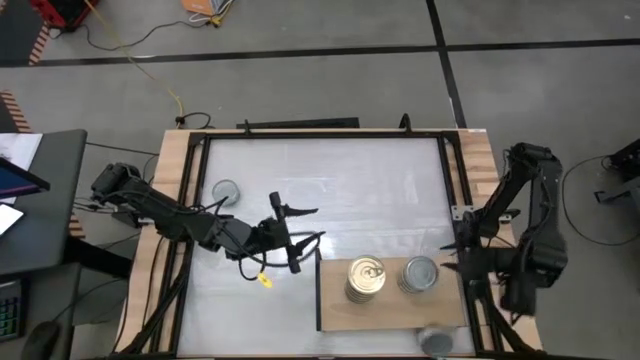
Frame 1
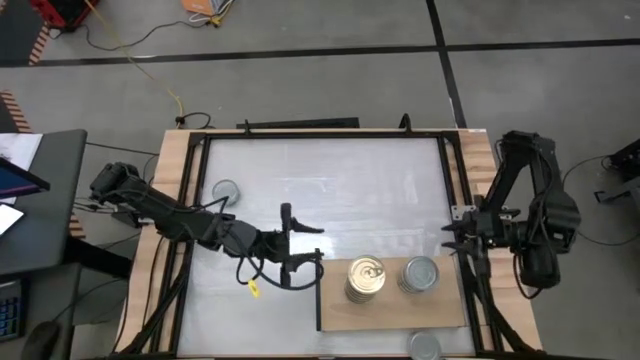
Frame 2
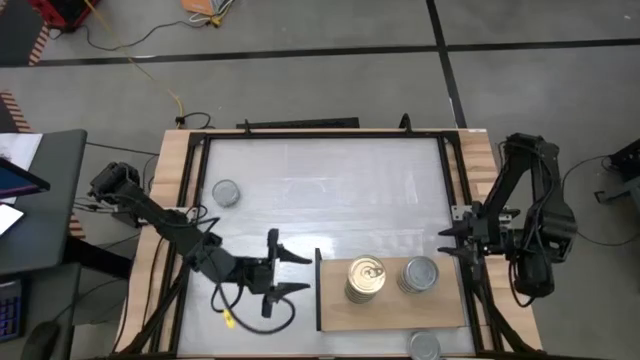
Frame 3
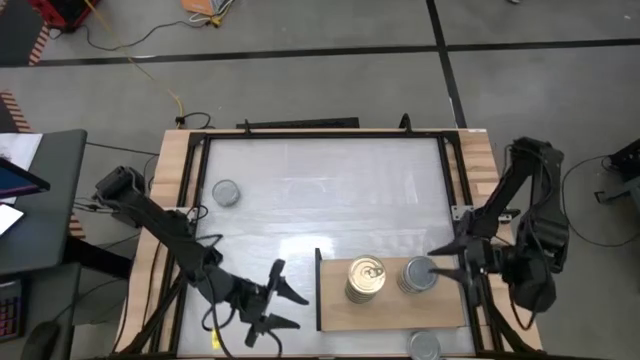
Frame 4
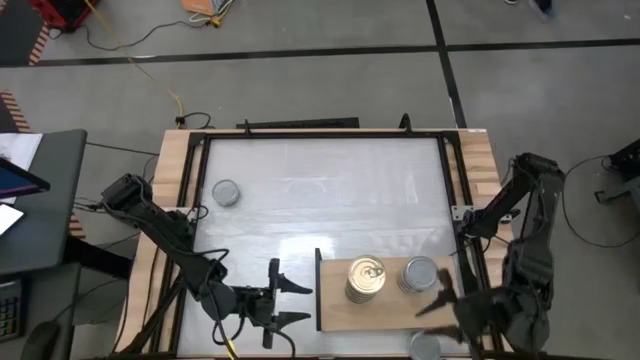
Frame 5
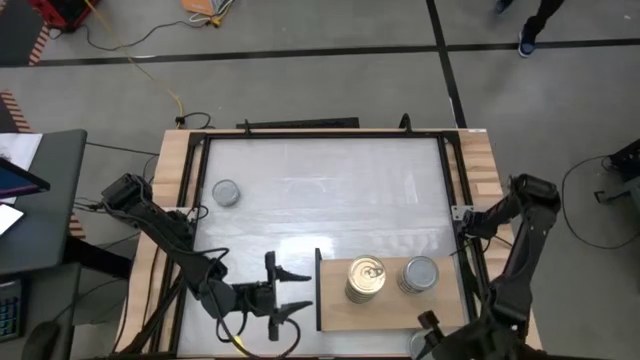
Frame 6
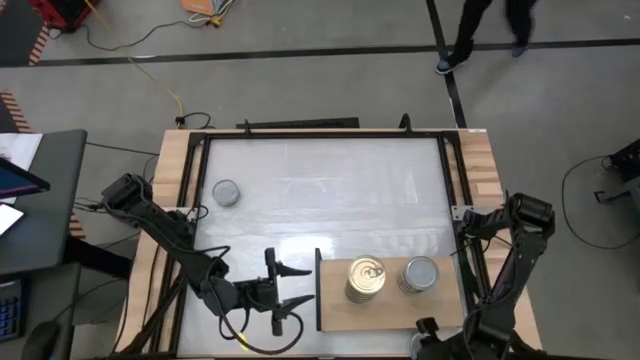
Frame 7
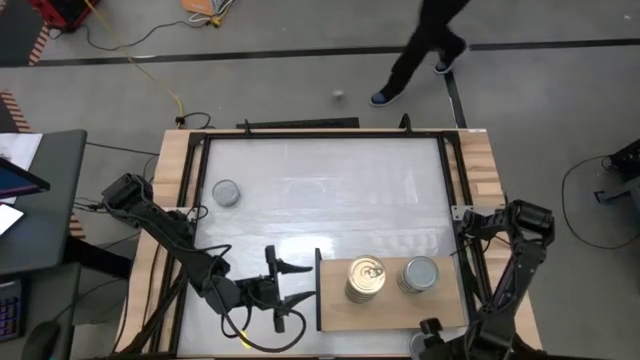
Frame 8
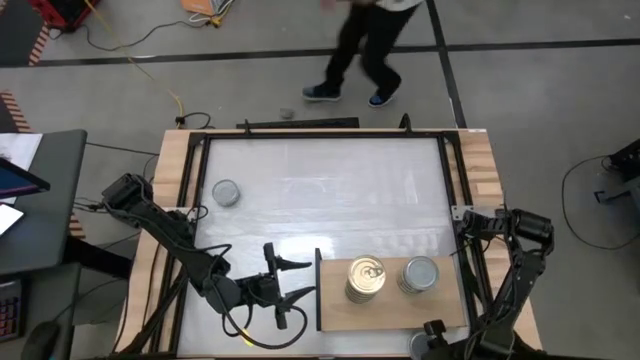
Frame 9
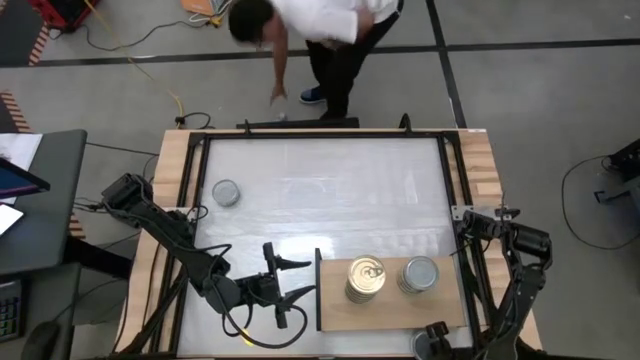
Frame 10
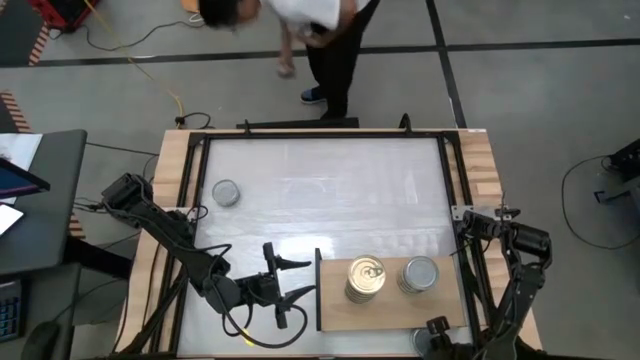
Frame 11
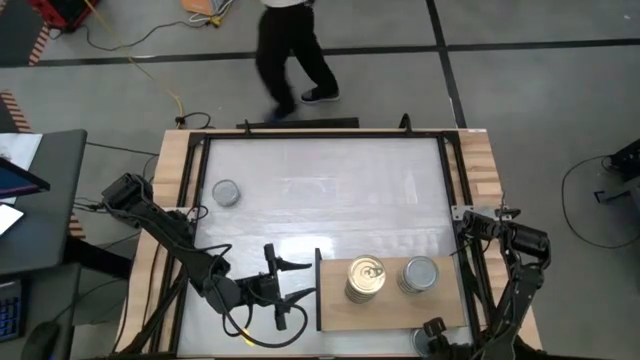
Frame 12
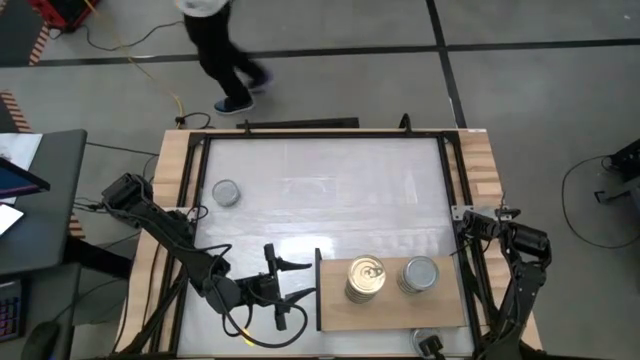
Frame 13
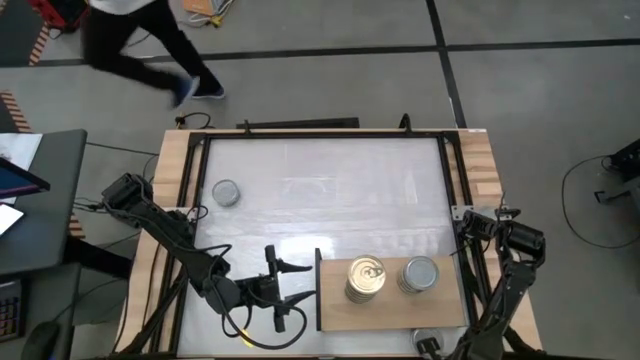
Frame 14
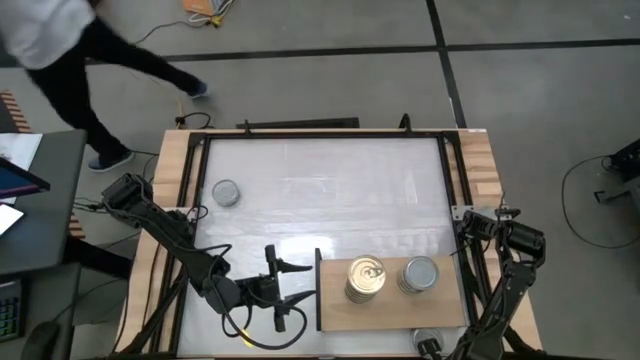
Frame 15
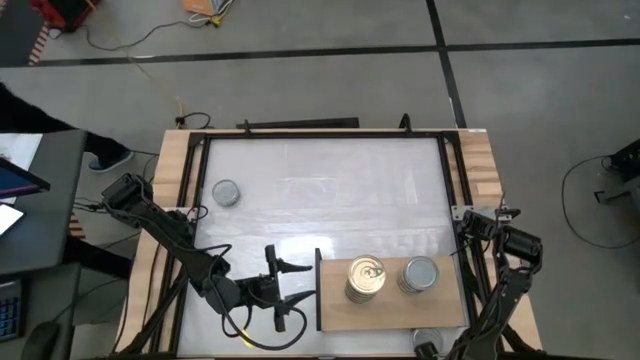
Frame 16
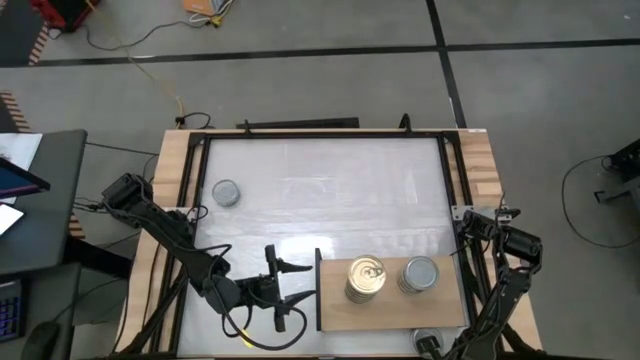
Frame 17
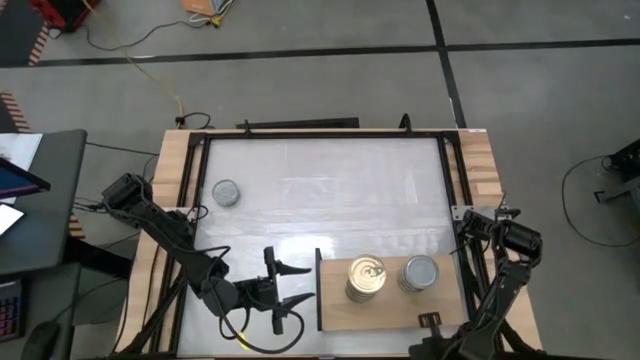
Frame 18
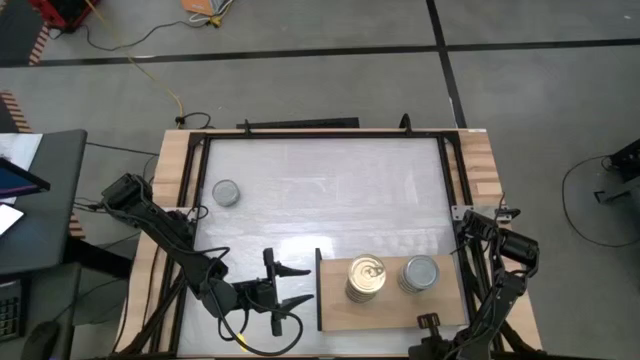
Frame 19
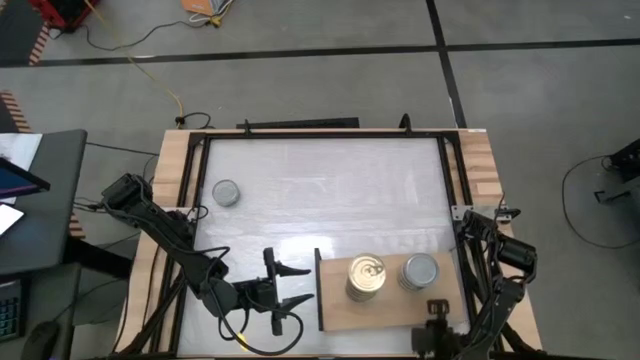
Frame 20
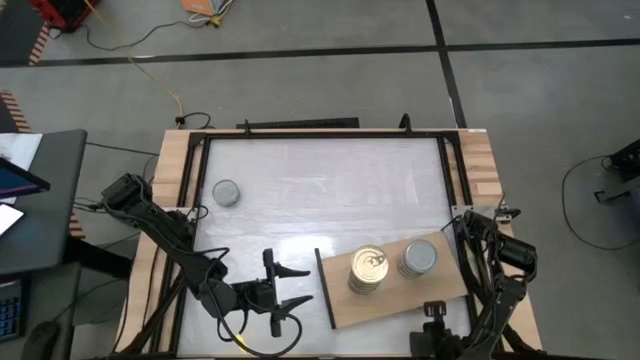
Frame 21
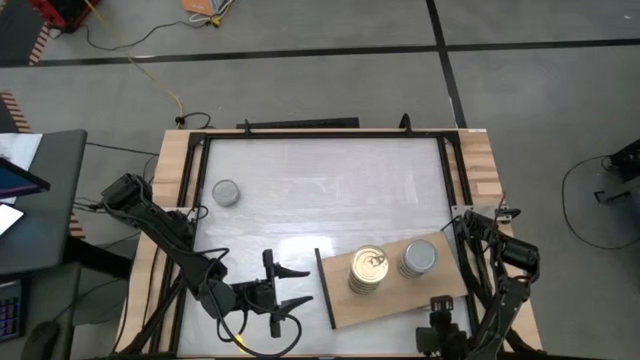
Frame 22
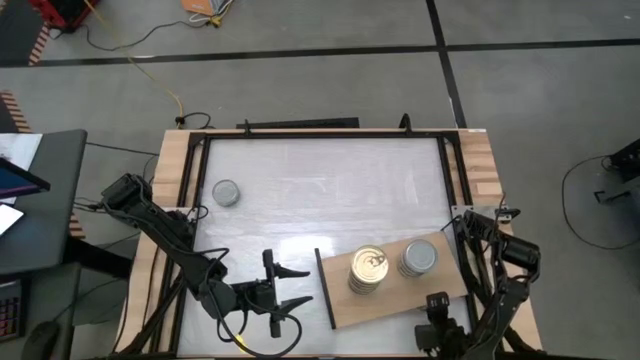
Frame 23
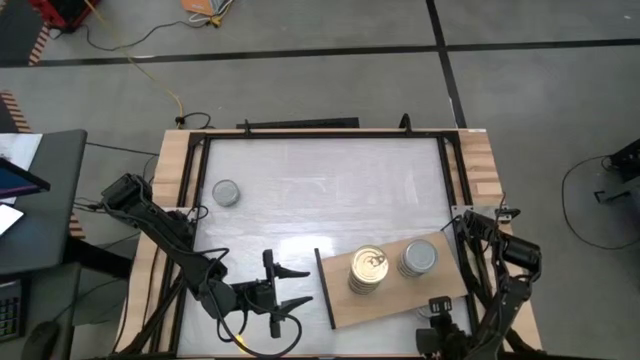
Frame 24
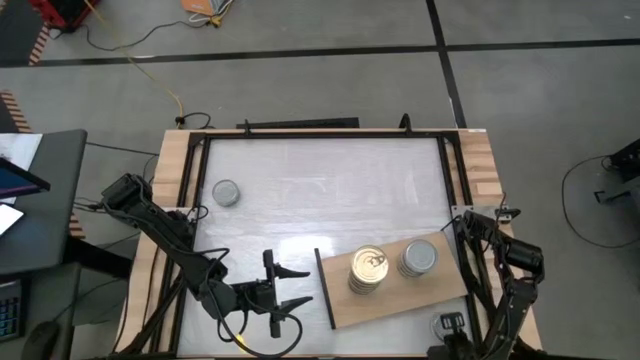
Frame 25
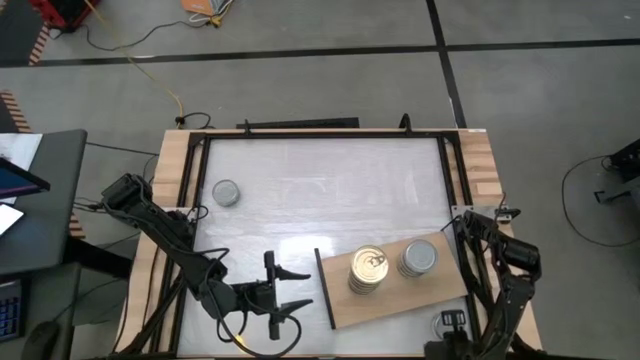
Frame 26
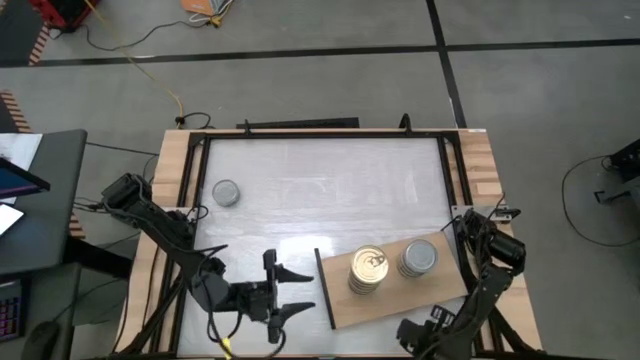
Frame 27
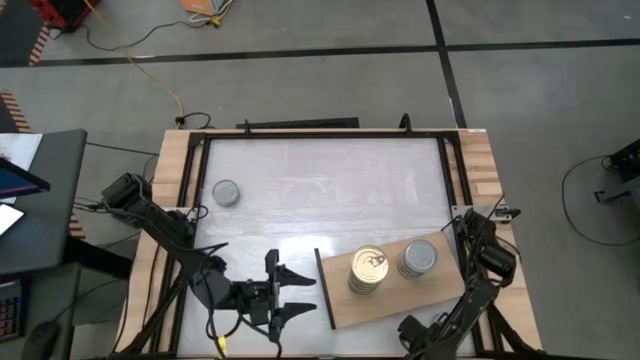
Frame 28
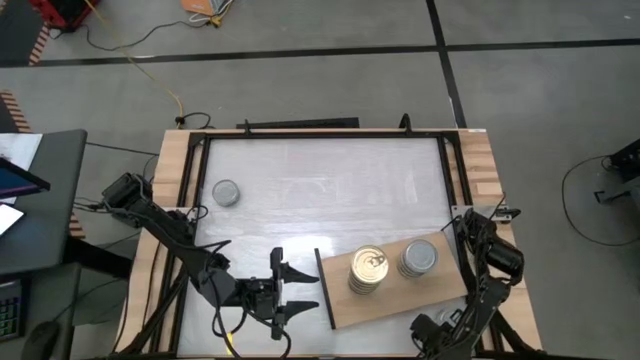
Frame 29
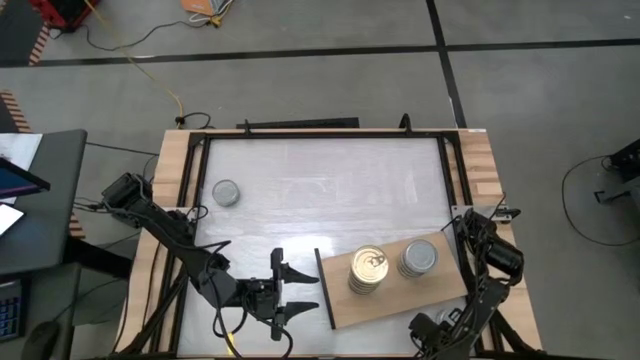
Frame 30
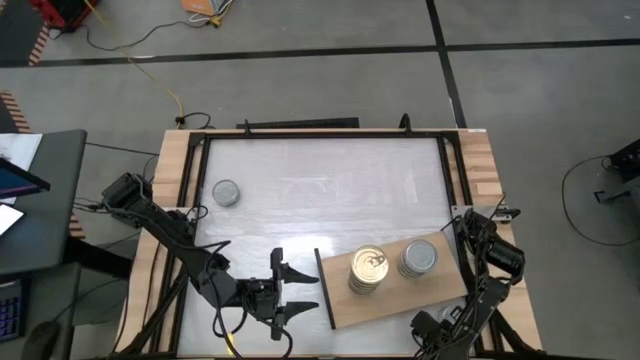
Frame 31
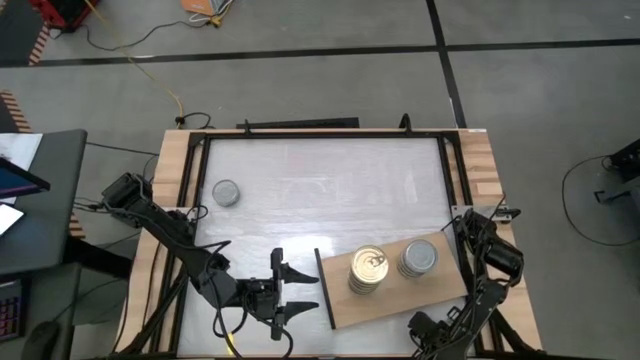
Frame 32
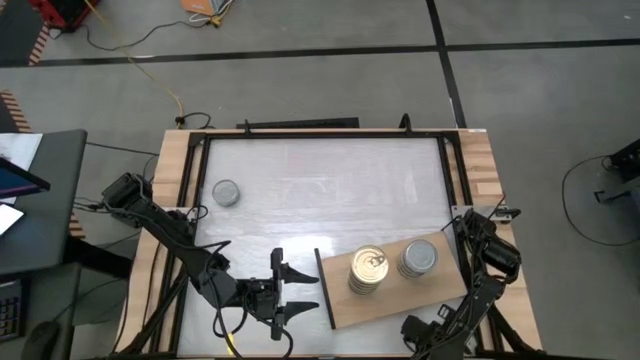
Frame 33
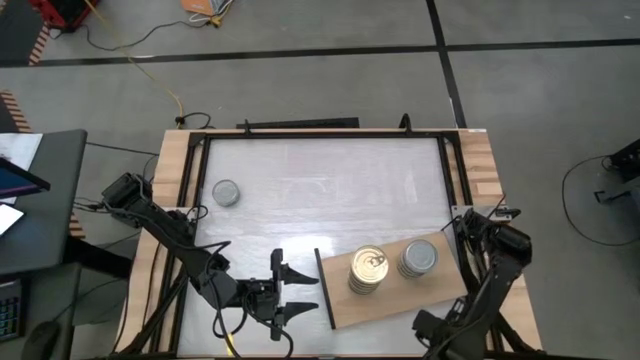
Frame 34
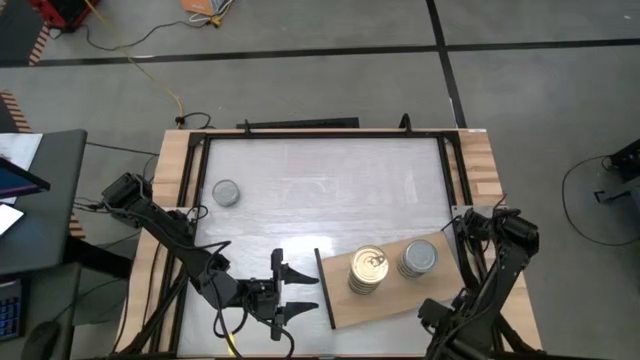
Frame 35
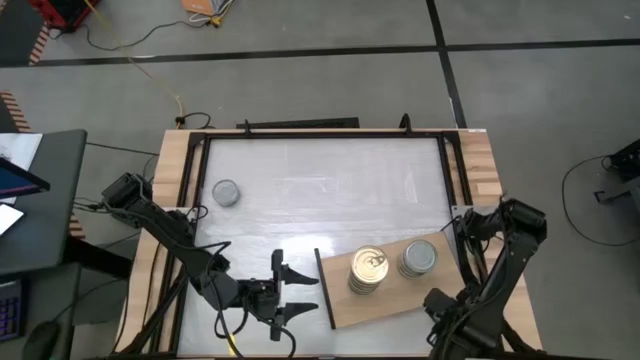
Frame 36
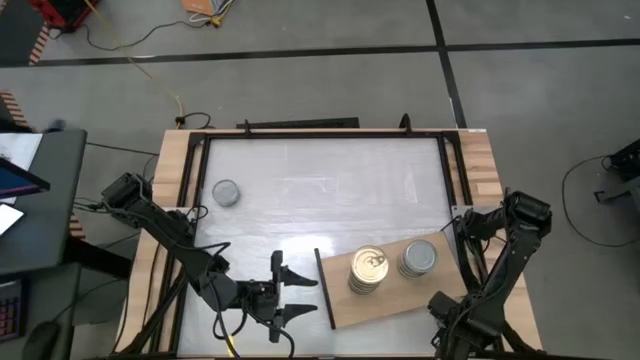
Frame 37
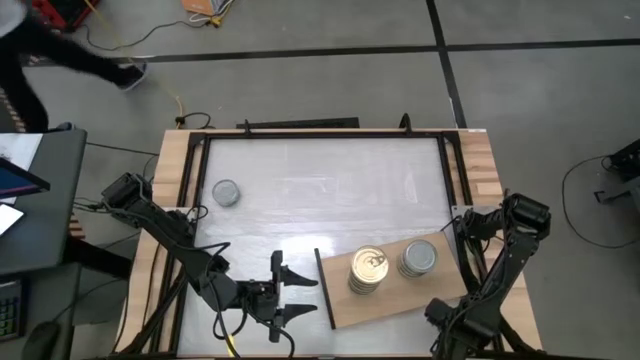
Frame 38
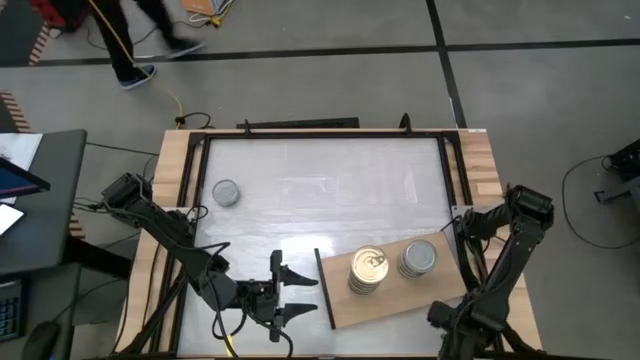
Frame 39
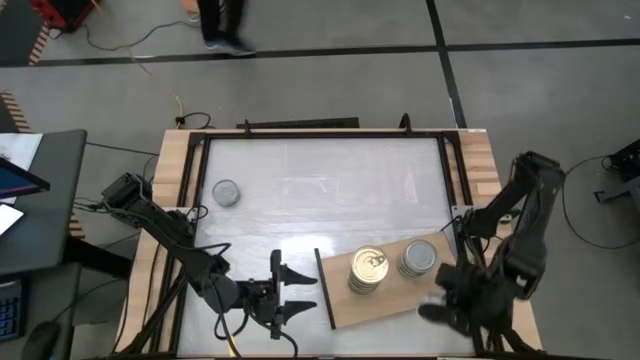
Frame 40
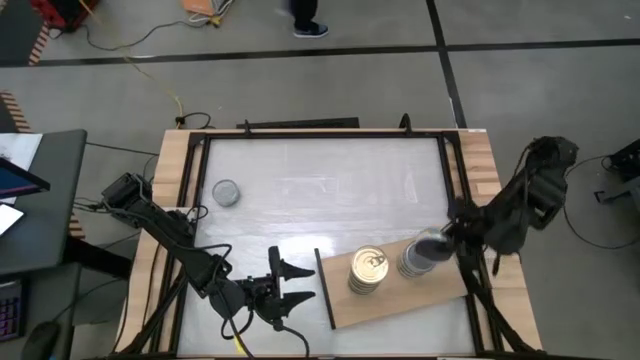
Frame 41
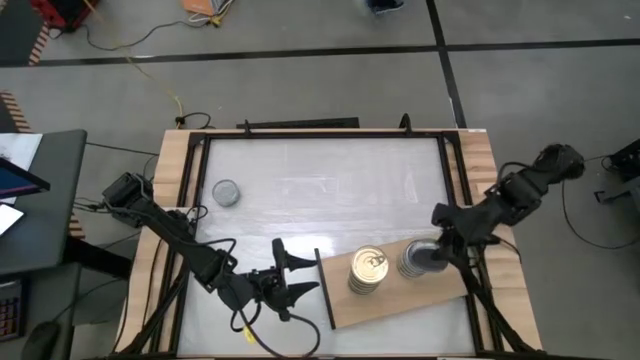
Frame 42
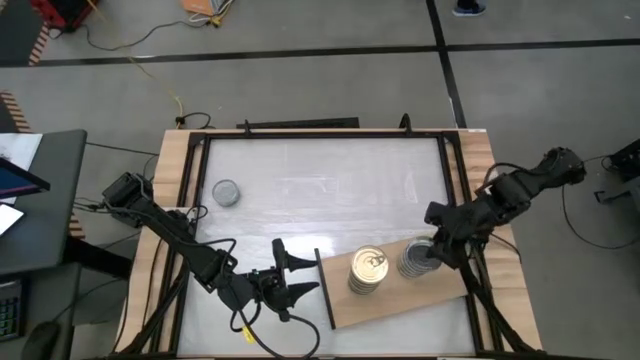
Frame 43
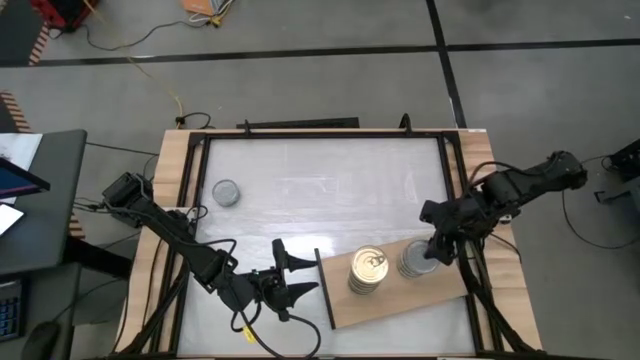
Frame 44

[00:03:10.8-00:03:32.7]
Task: Stack canned seafood by type on shelf
Stack the green tuna can on top of the green tuna can on the shelf
